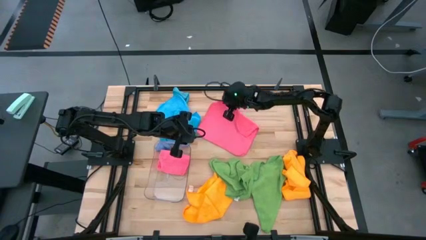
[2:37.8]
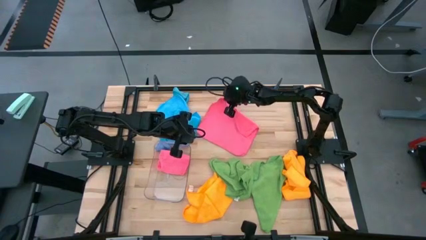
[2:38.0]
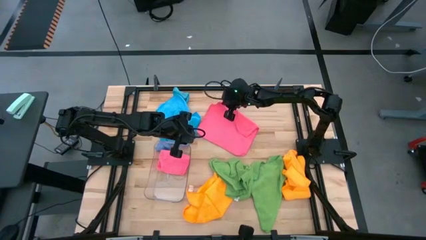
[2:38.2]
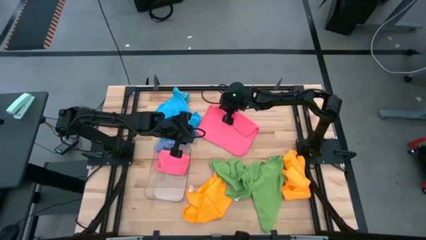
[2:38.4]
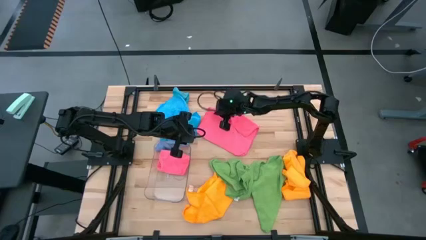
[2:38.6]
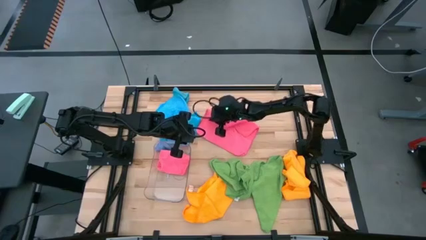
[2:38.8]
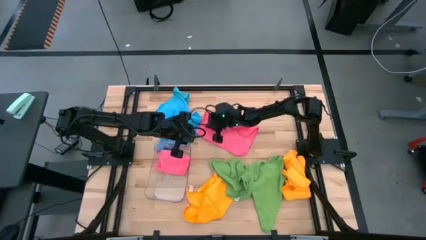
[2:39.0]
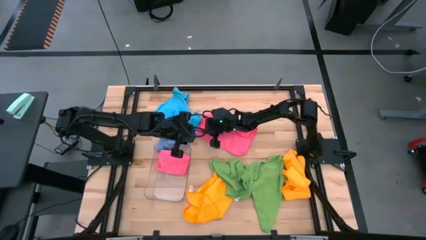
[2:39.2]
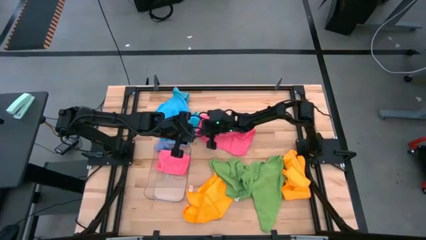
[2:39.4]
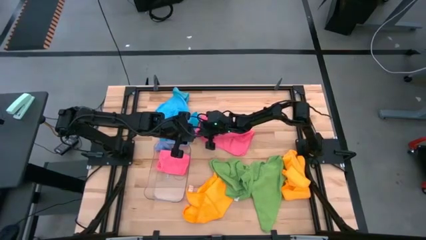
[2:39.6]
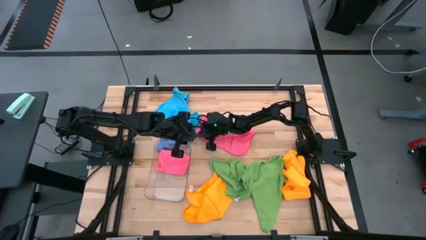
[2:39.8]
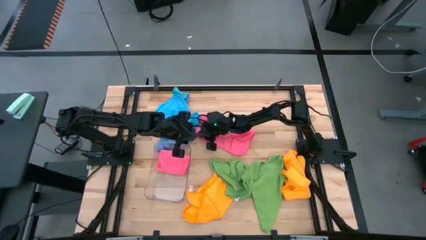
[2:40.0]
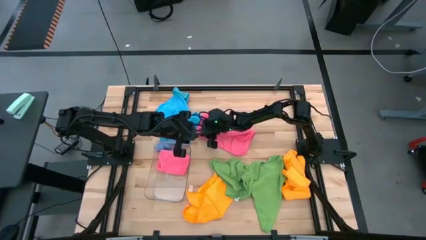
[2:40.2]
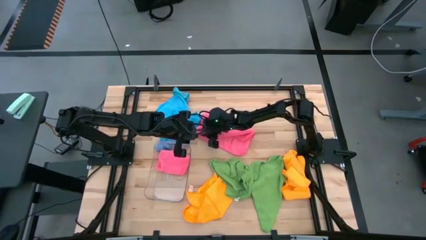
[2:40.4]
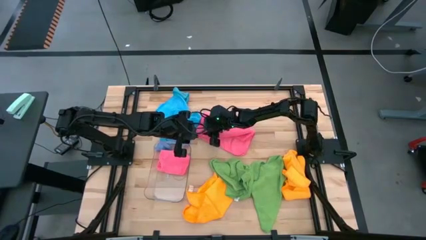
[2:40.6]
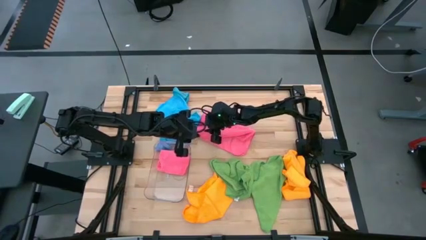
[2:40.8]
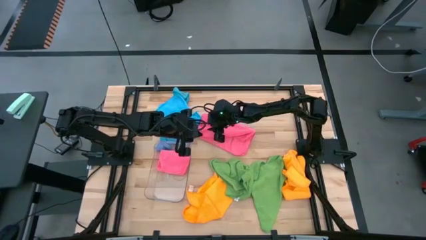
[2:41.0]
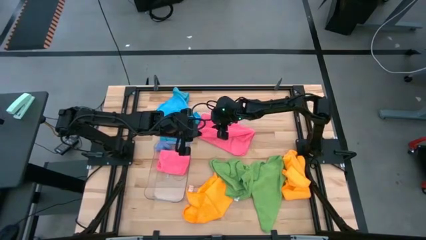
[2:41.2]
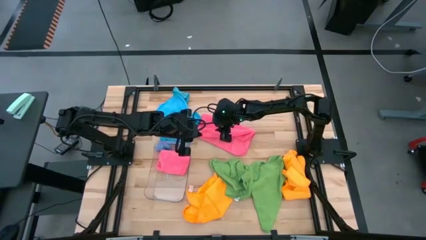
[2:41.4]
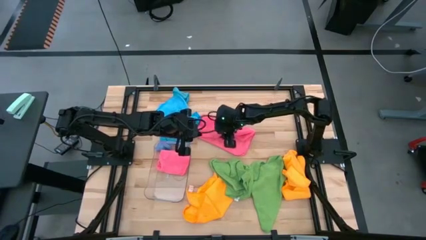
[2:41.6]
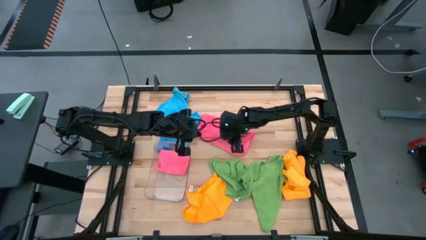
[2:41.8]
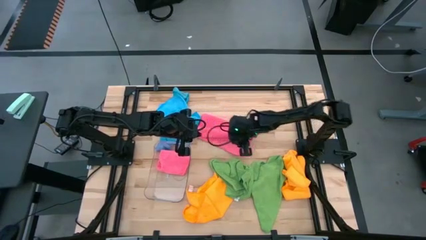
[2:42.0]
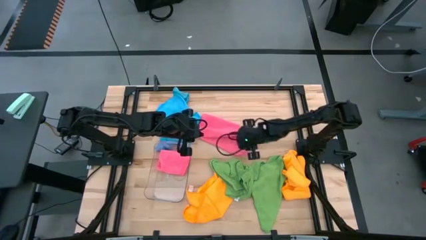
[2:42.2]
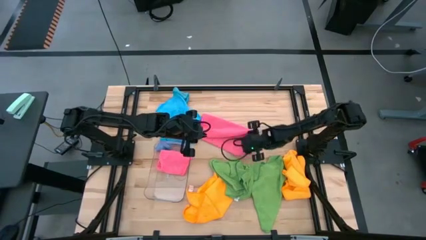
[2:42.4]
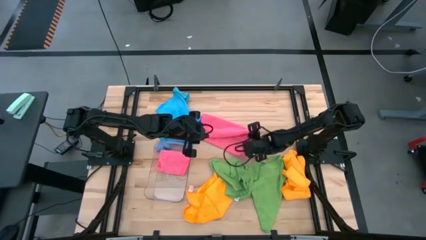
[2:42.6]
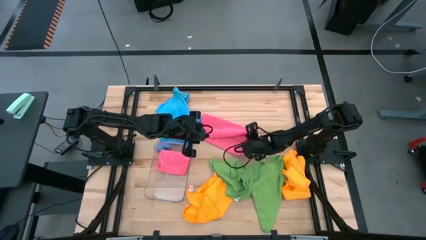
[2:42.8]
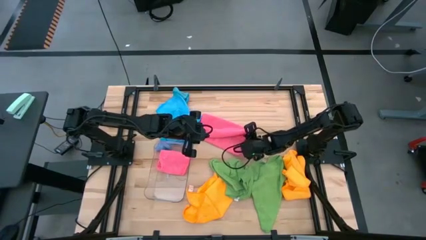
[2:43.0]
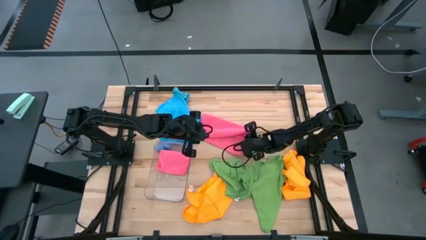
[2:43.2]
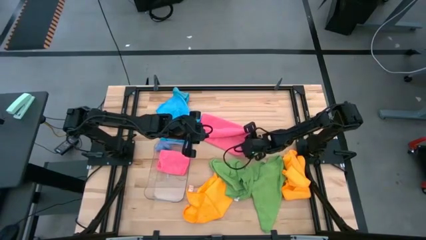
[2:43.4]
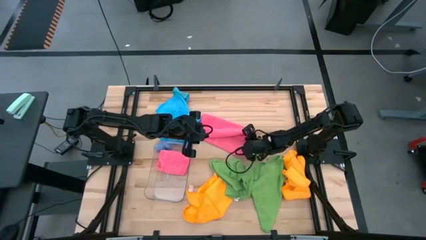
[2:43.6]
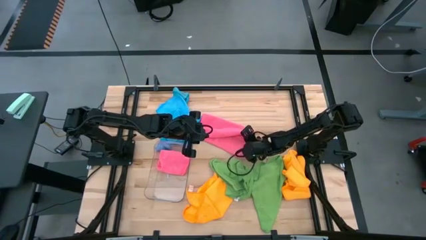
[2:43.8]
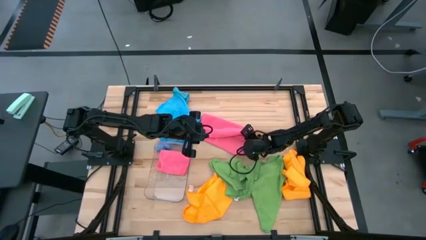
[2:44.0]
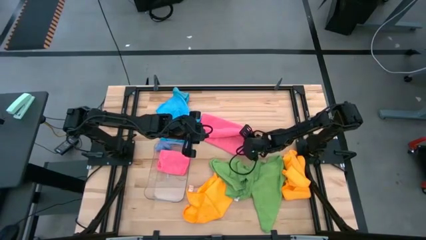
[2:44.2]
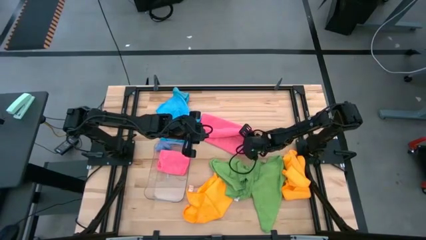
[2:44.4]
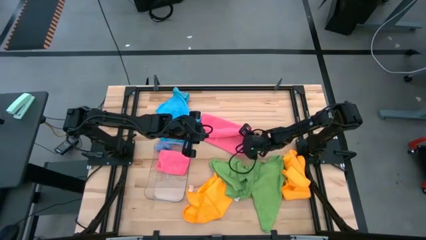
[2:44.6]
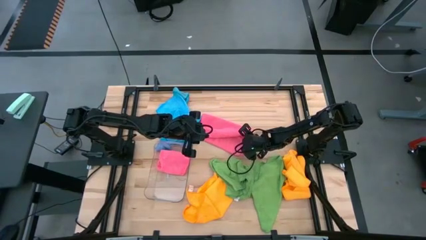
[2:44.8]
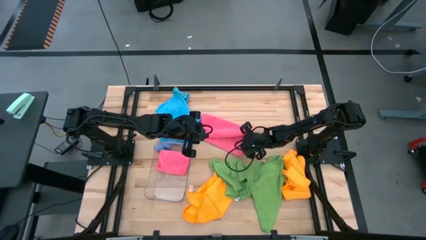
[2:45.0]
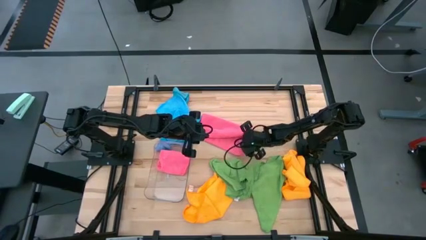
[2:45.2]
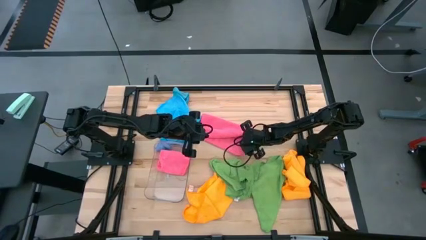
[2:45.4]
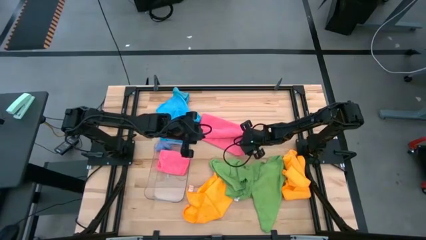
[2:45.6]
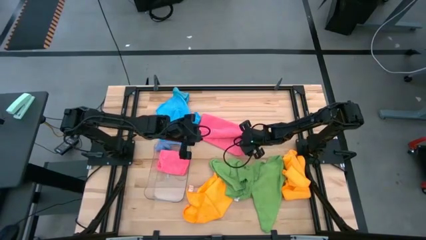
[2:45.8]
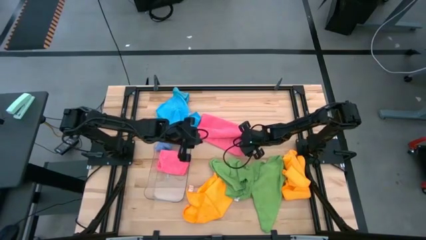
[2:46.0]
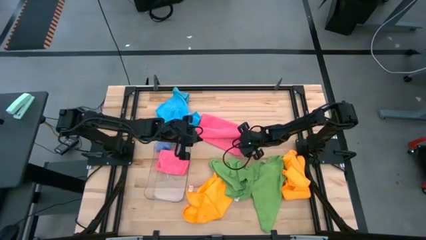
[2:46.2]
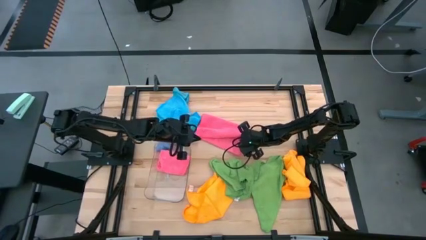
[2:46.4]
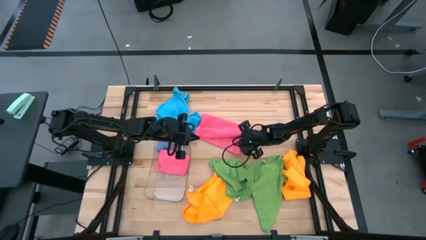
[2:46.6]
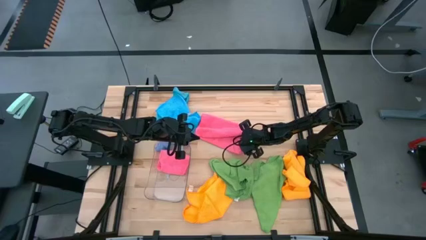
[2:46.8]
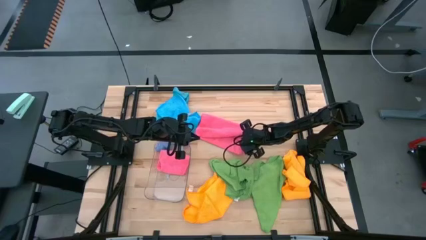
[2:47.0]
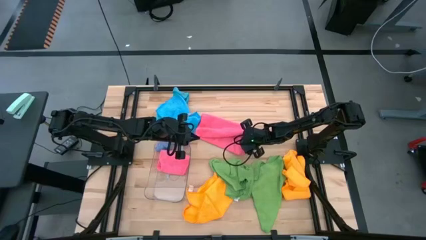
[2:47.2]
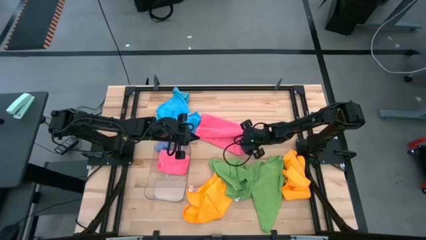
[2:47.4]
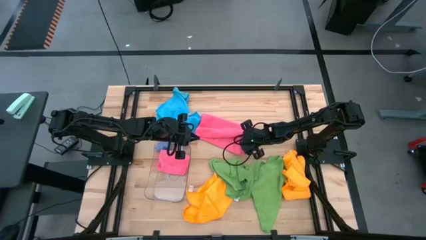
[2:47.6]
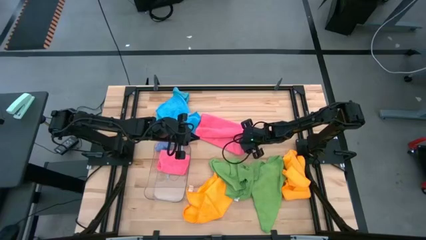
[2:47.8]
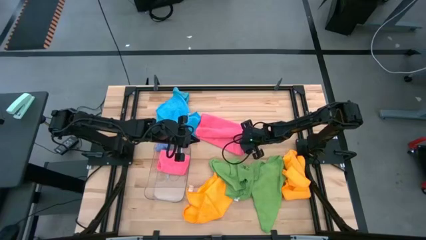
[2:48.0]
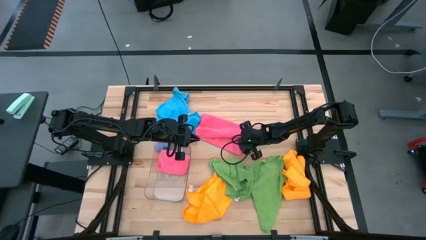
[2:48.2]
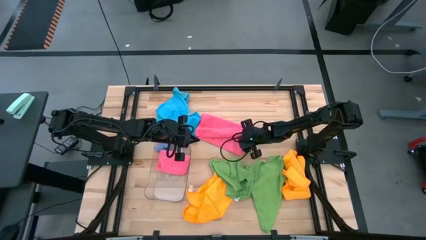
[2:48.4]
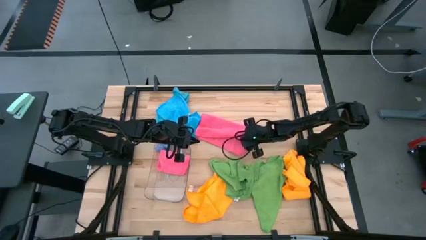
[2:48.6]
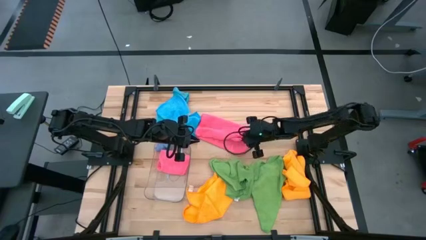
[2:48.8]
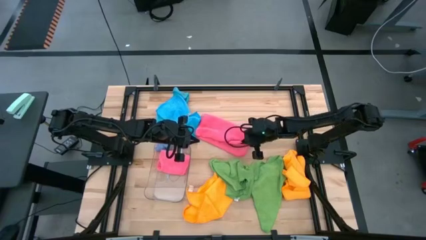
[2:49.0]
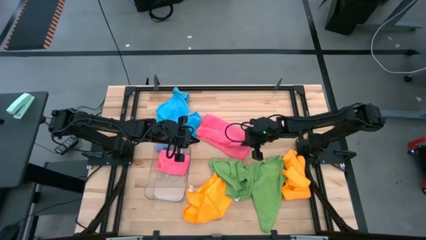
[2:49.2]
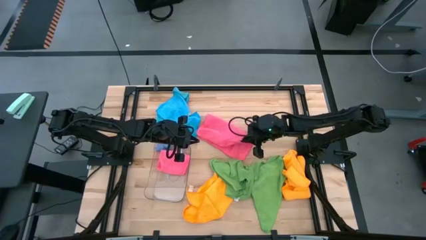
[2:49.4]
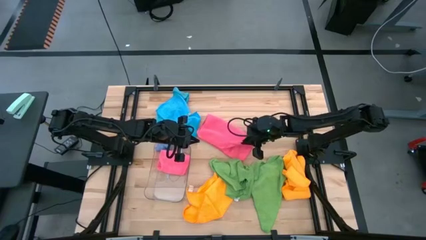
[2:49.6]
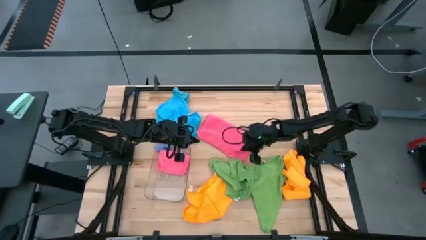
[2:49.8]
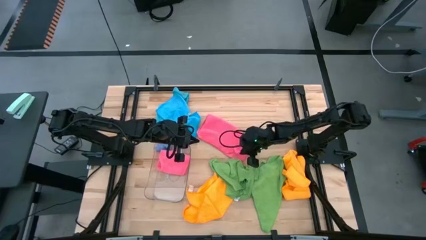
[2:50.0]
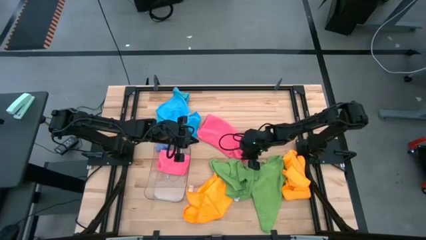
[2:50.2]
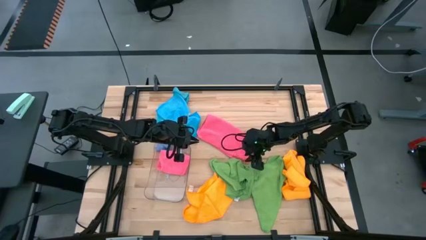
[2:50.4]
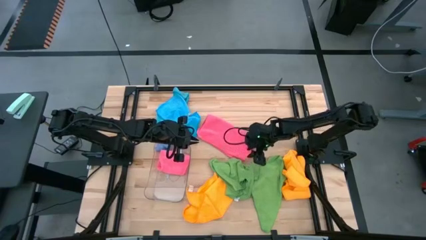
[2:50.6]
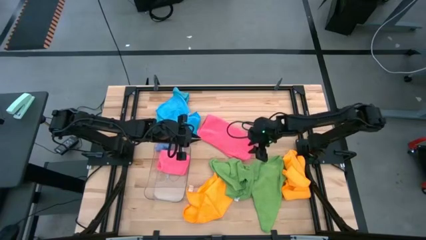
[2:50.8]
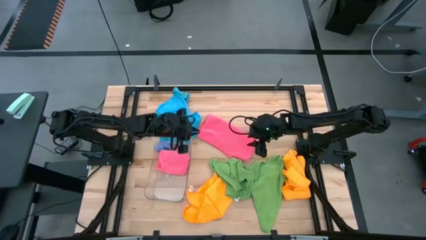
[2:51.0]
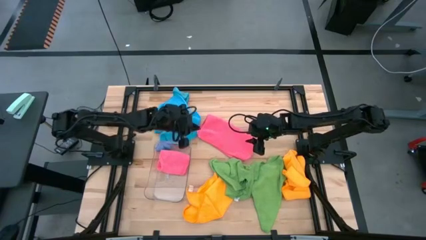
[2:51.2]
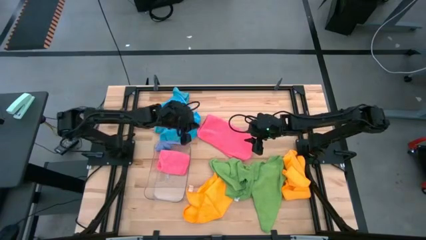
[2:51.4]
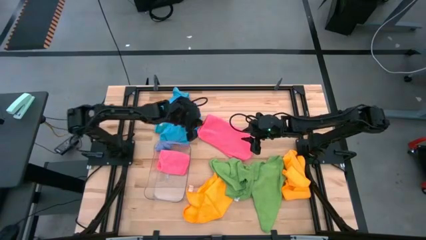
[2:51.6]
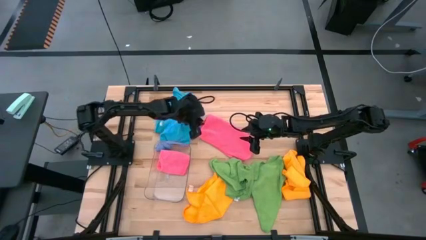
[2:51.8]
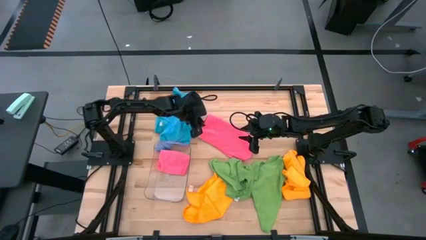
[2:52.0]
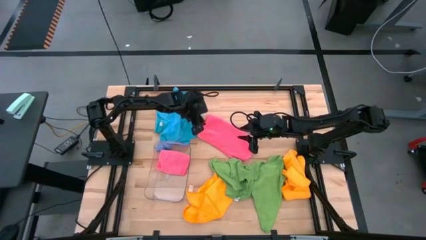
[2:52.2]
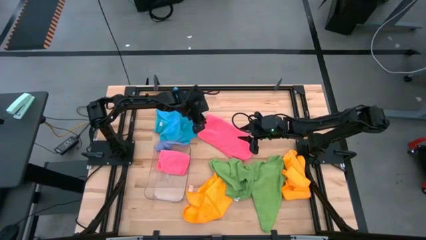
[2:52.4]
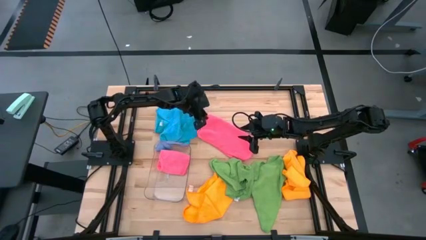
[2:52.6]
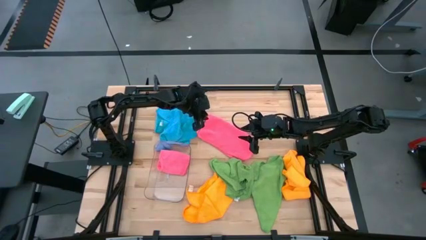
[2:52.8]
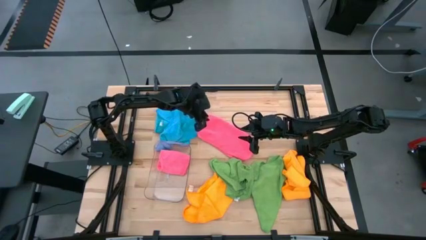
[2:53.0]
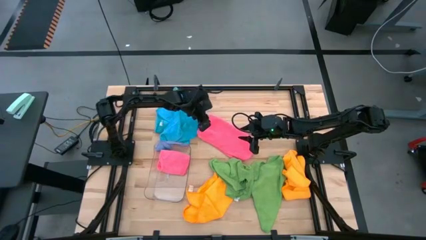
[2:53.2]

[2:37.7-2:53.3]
Task: Fold microfiber towels
Fold the pink microfiber cloth
